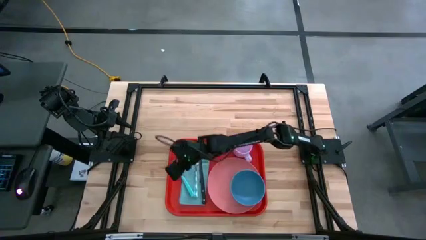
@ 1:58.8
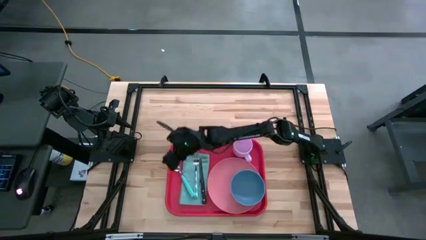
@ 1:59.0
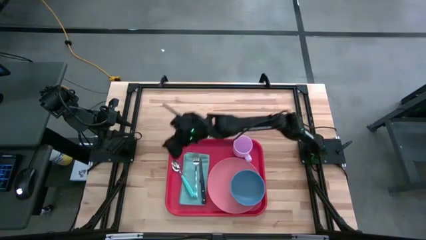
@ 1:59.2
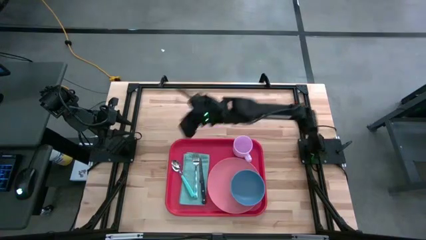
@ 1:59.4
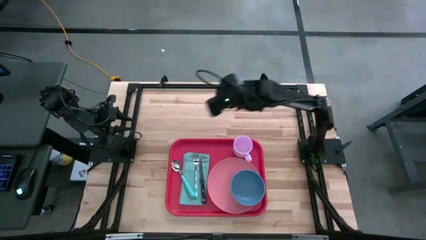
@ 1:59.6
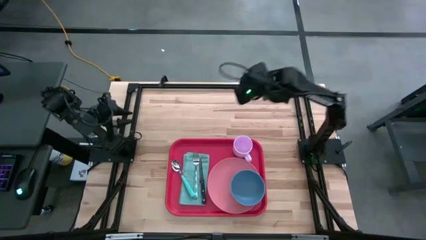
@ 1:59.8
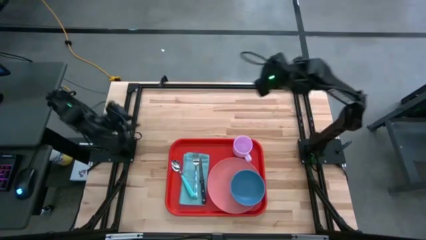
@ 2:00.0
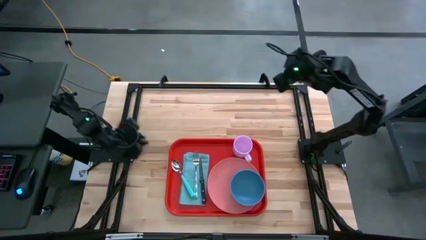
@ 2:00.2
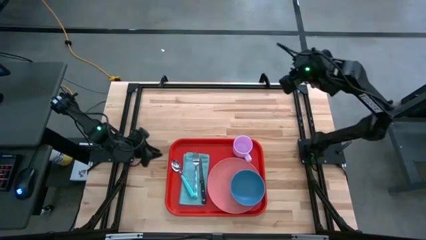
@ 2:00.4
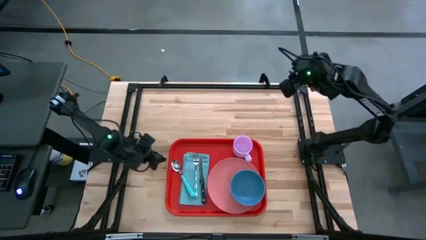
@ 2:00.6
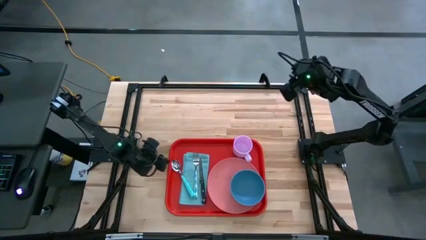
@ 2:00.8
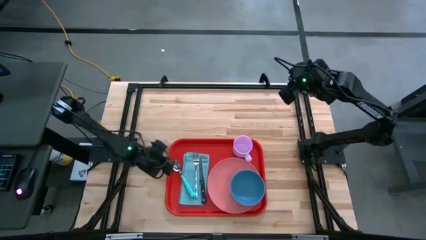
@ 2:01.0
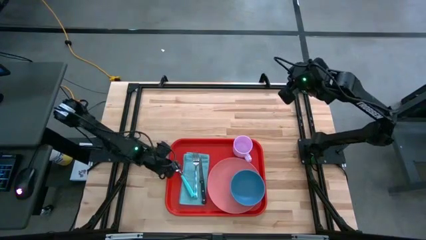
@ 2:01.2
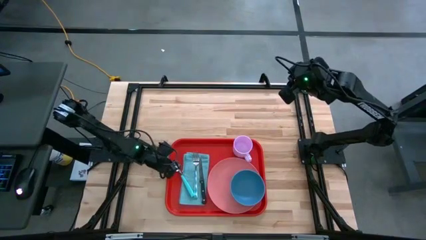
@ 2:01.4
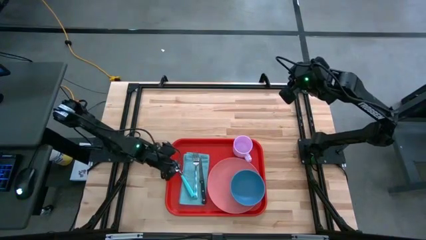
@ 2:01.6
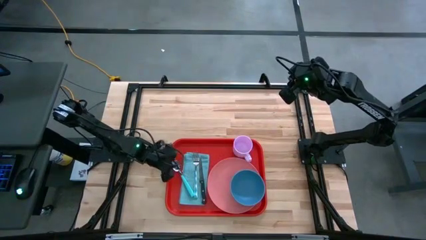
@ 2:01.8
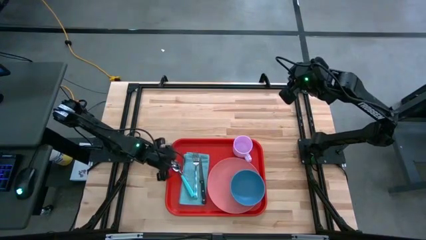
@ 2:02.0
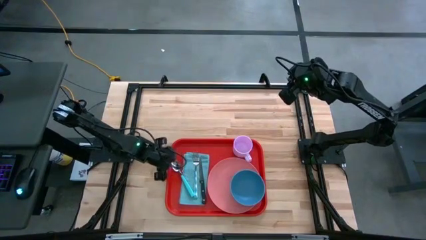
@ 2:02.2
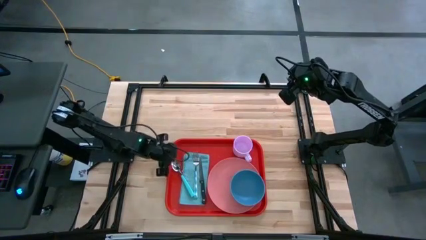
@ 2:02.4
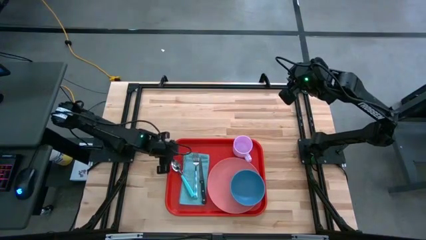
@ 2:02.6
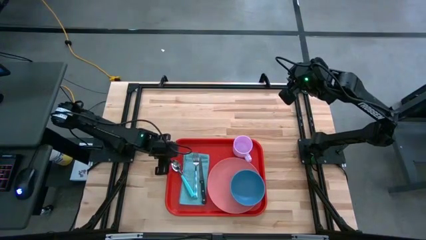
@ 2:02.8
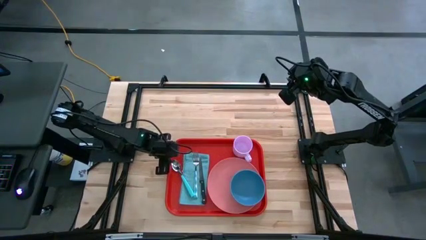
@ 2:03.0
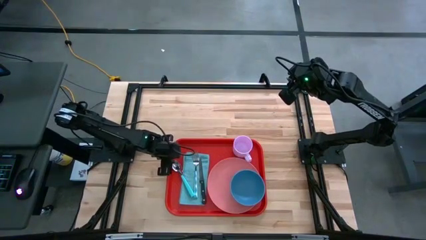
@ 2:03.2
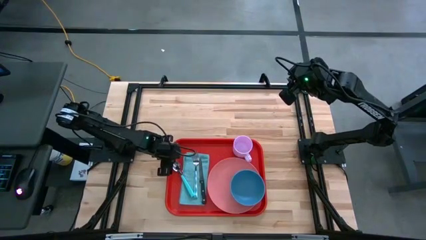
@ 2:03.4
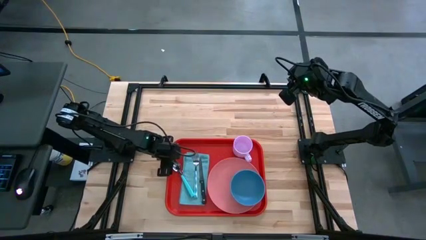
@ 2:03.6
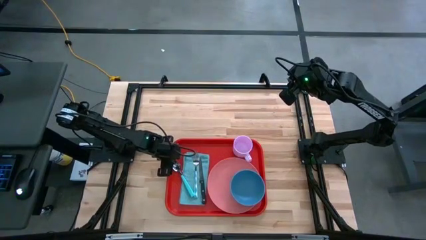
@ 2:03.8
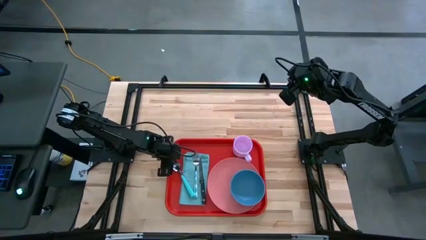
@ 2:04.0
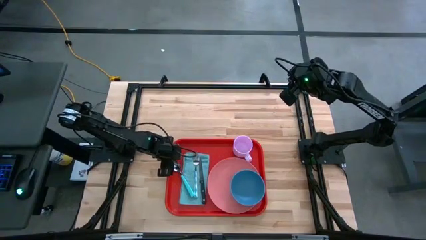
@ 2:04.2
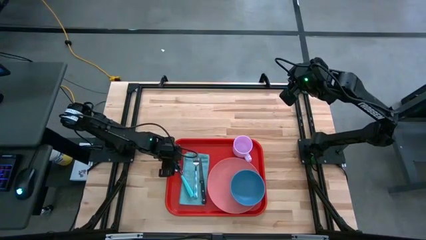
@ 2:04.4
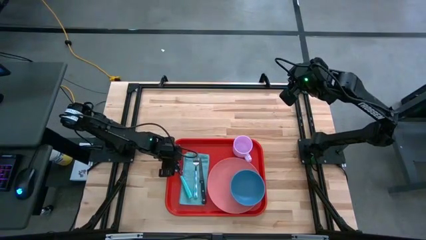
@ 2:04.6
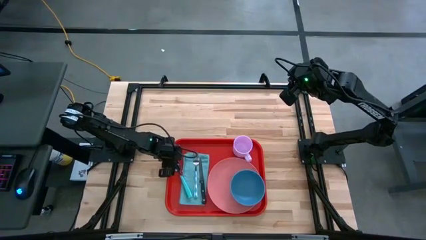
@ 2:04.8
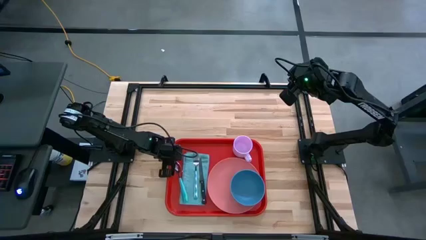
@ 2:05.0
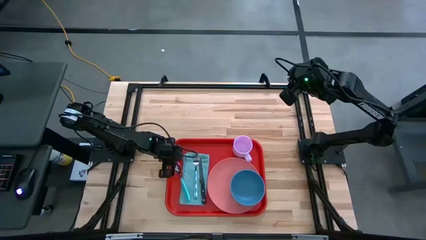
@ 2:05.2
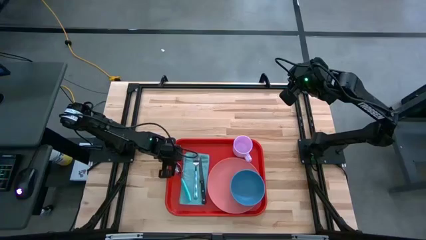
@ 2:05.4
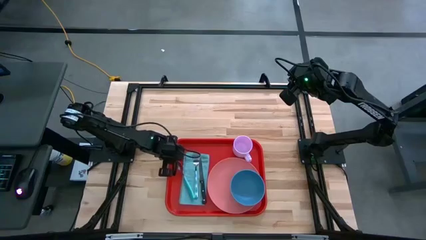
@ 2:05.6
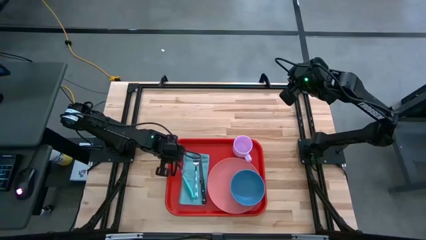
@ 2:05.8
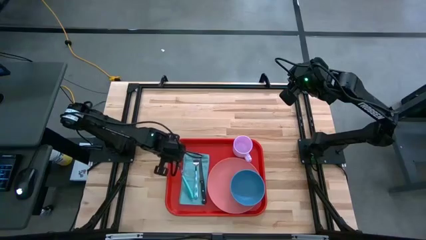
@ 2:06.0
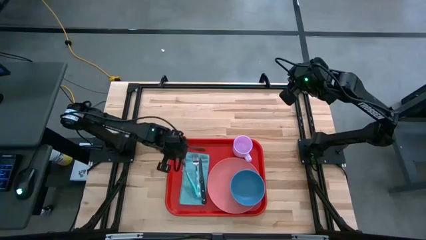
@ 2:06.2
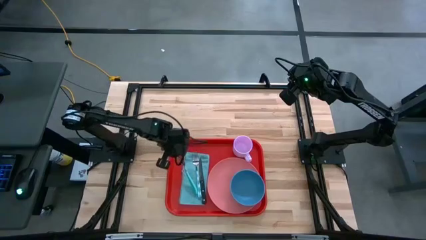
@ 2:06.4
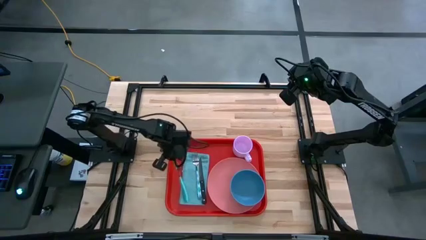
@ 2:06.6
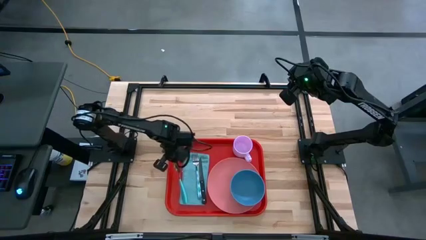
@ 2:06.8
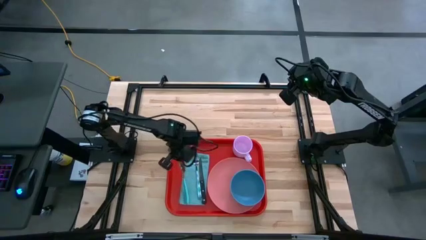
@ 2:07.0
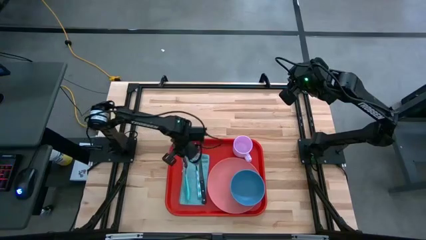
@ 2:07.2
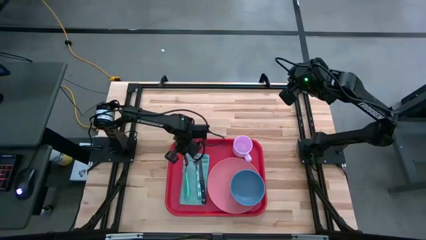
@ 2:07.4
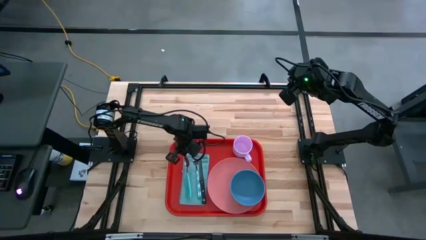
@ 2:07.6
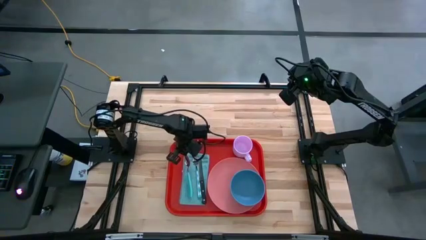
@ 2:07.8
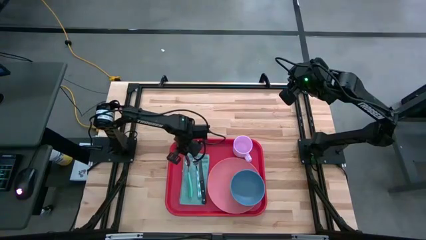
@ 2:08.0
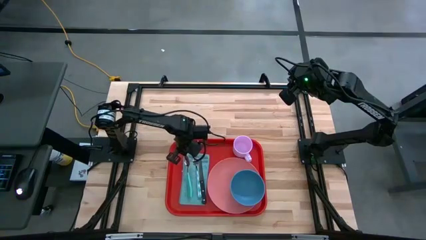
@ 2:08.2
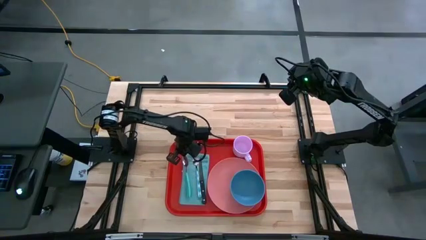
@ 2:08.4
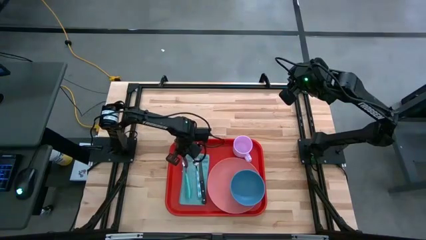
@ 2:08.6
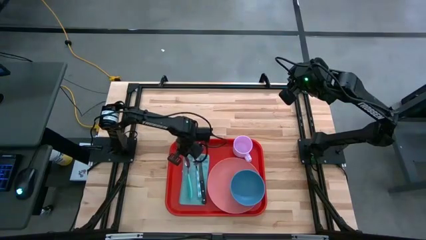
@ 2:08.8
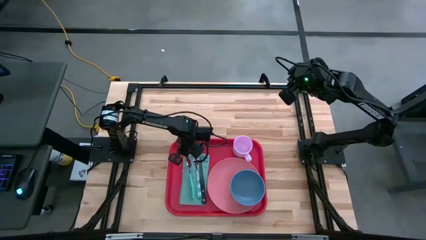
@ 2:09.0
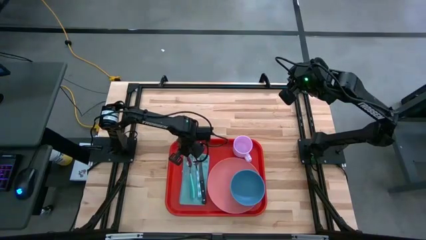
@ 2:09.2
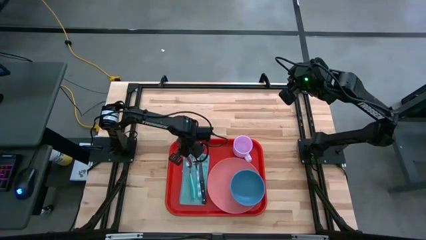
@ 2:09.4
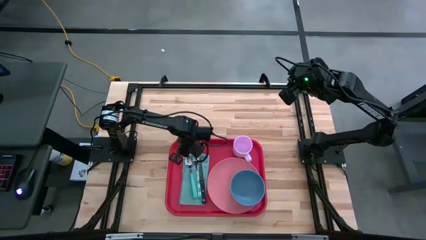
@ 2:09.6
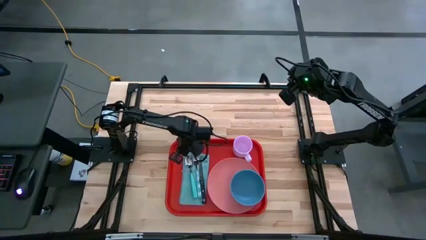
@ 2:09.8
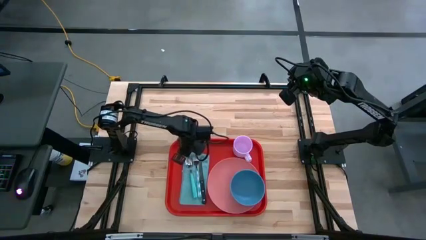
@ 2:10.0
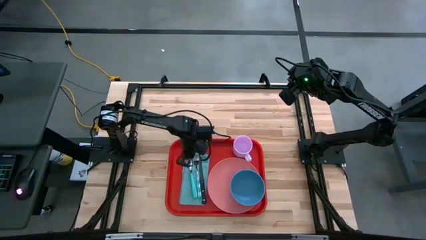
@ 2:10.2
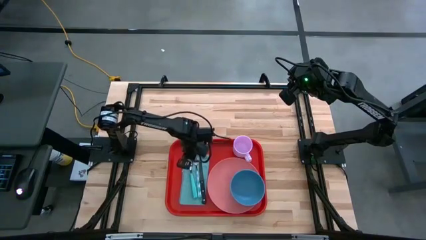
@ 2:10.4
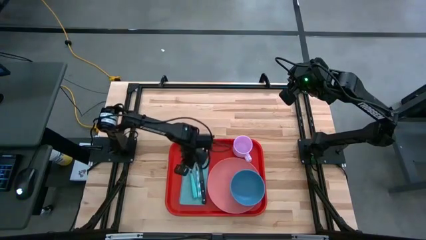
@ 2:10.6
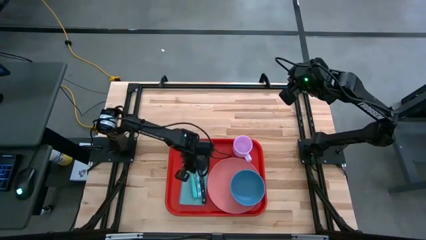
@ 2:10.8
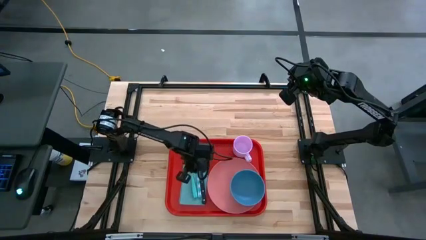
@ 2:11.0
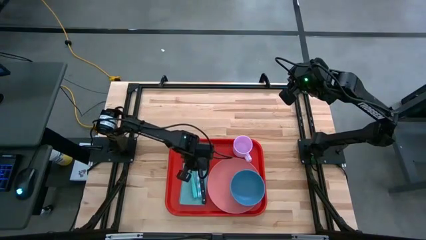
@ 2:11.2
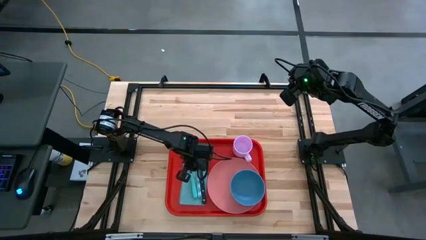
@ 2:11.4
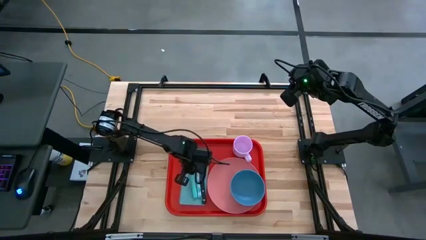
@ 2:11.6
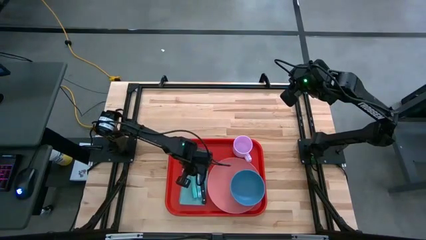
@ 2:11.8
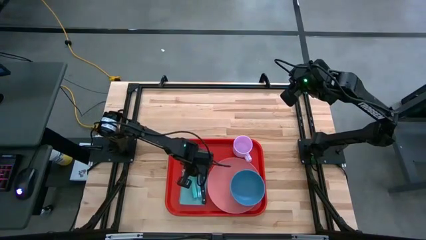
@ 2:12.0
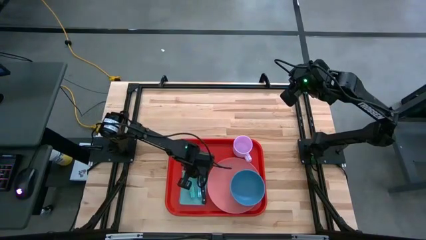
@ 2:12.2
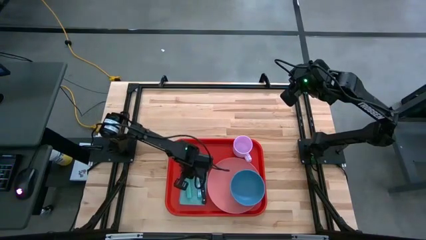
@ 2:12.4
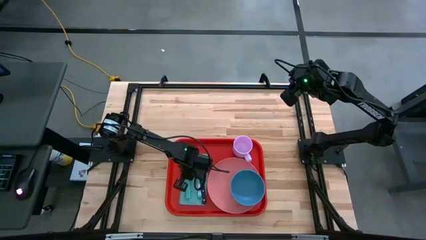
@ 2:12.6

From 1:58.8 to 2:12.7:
Task: Set up tray
Put the blue spoon on the blue napkin to the left side of the blue fork on the red serving tray
